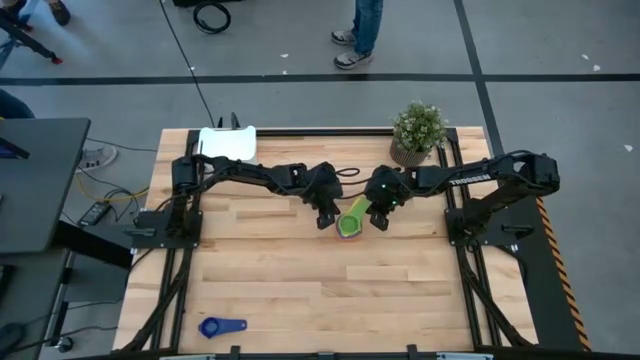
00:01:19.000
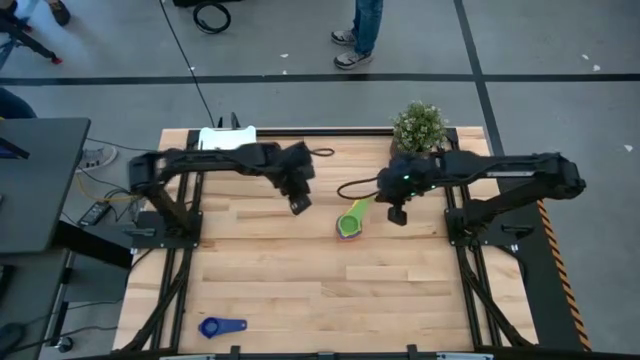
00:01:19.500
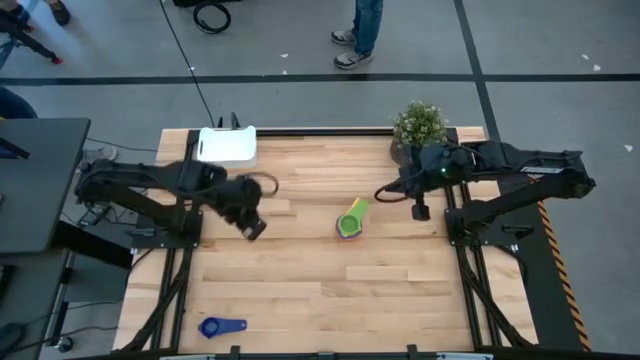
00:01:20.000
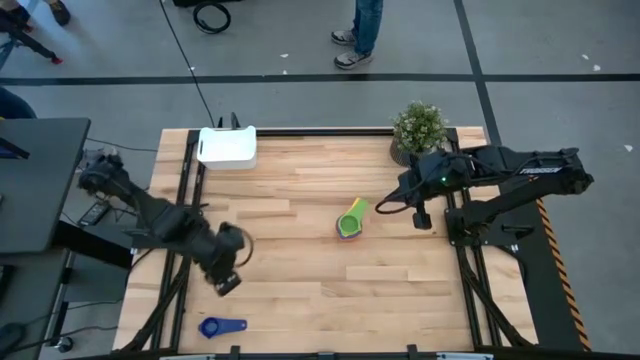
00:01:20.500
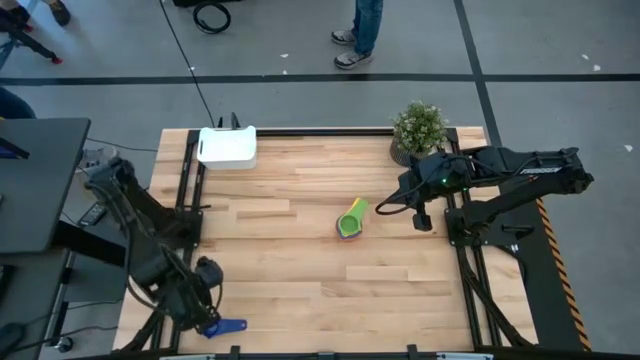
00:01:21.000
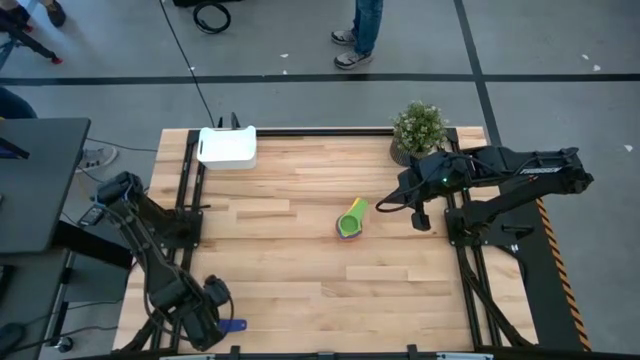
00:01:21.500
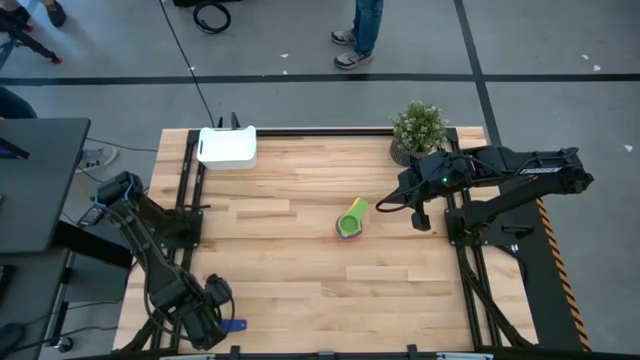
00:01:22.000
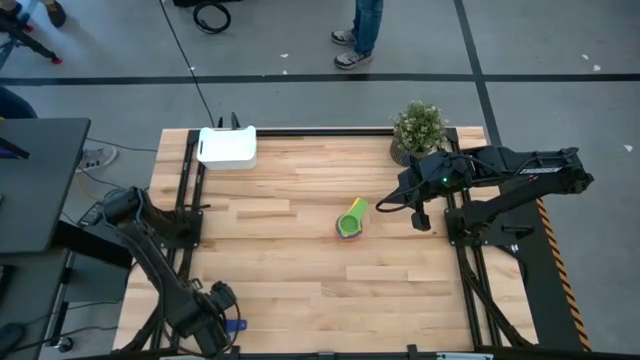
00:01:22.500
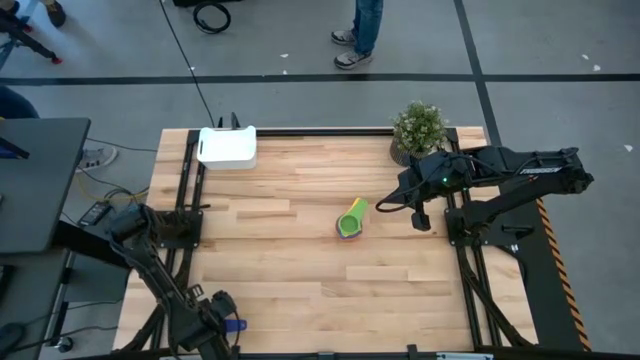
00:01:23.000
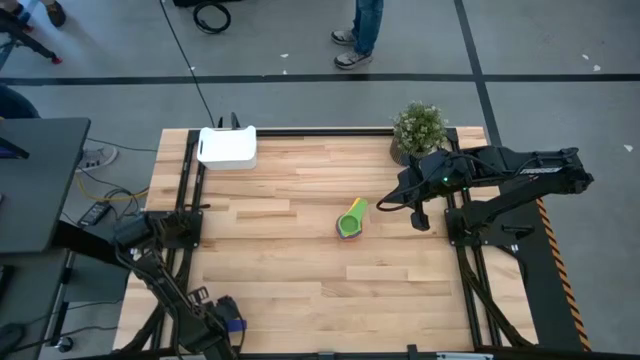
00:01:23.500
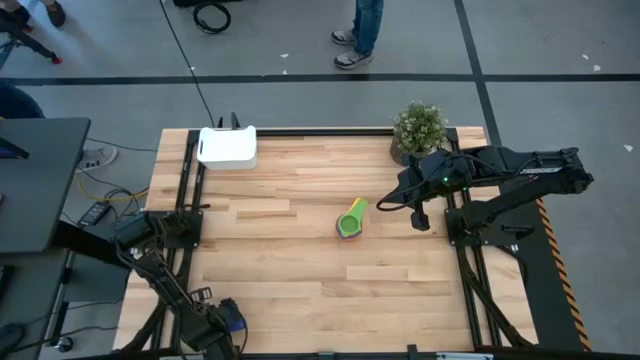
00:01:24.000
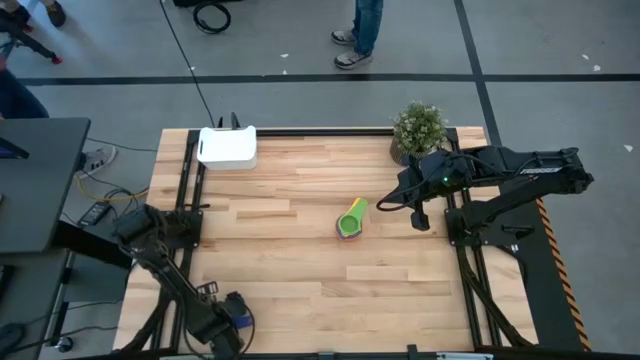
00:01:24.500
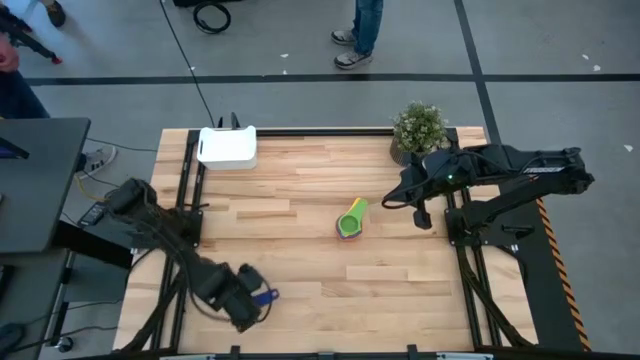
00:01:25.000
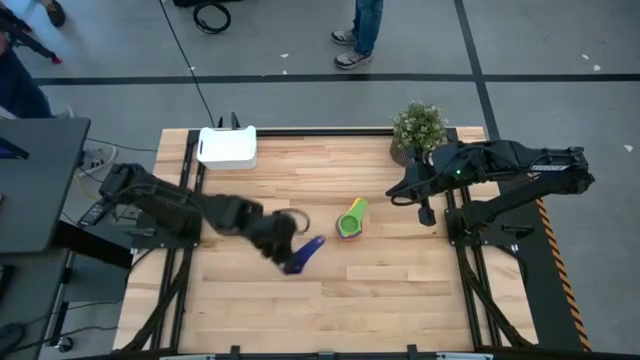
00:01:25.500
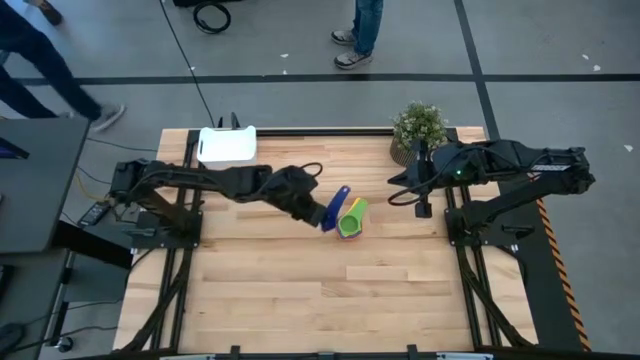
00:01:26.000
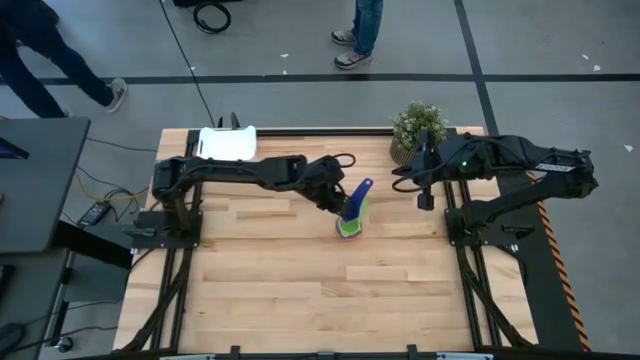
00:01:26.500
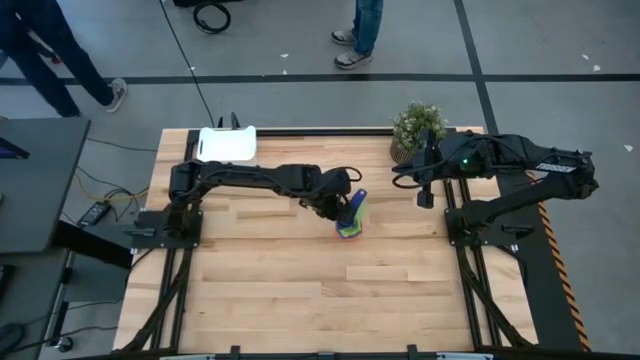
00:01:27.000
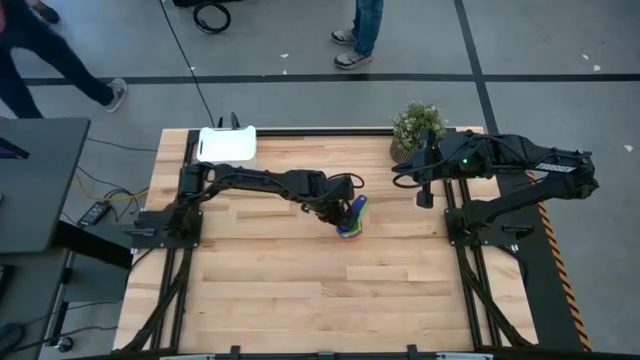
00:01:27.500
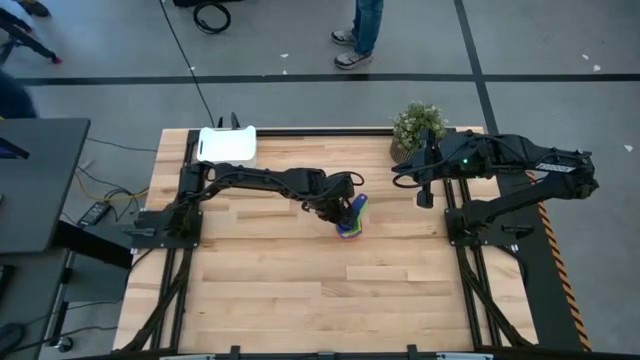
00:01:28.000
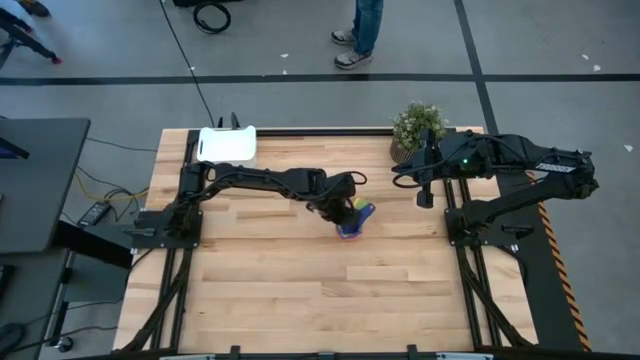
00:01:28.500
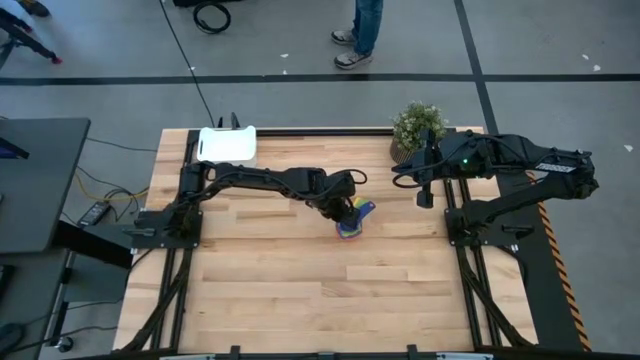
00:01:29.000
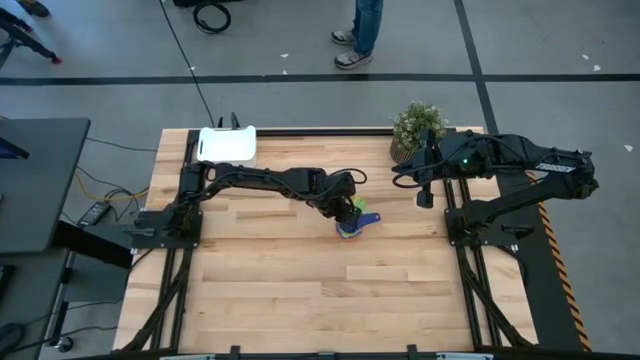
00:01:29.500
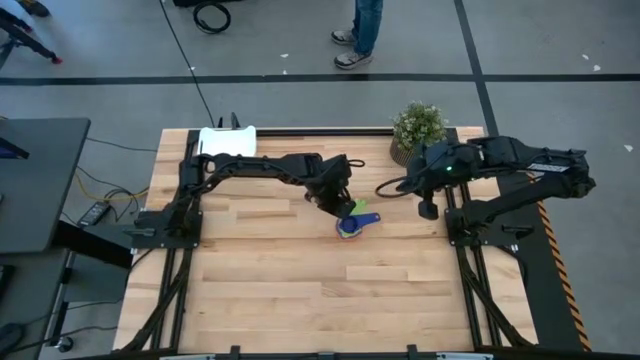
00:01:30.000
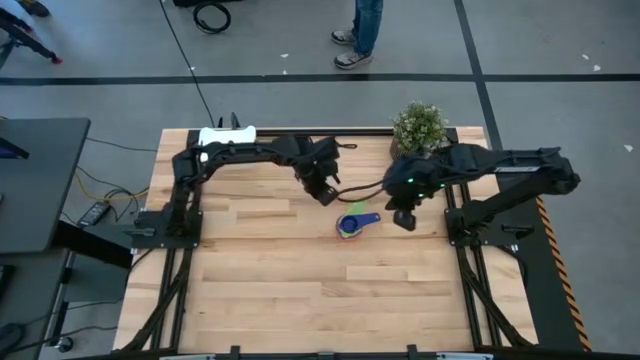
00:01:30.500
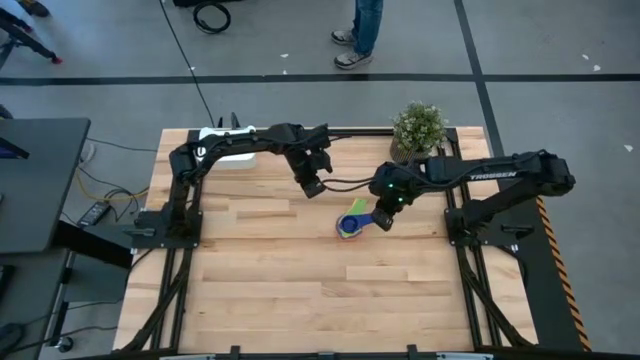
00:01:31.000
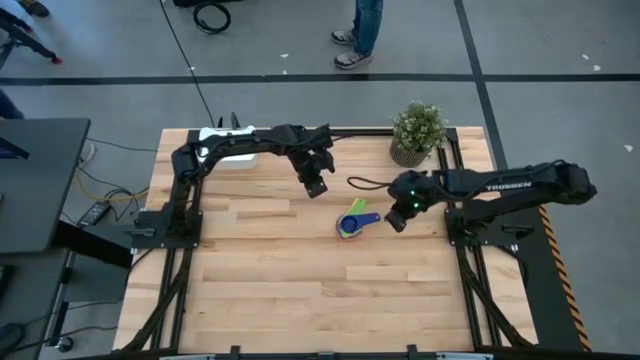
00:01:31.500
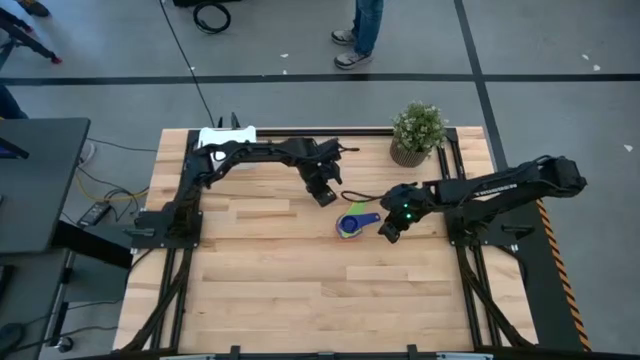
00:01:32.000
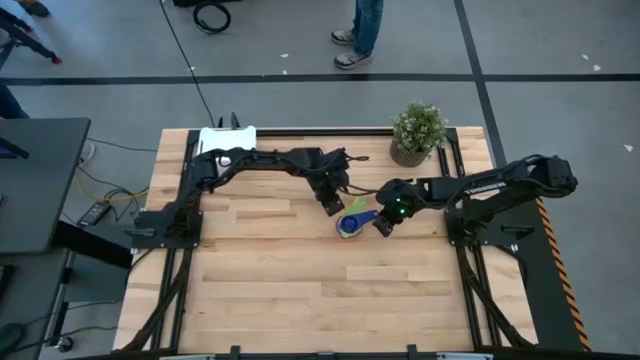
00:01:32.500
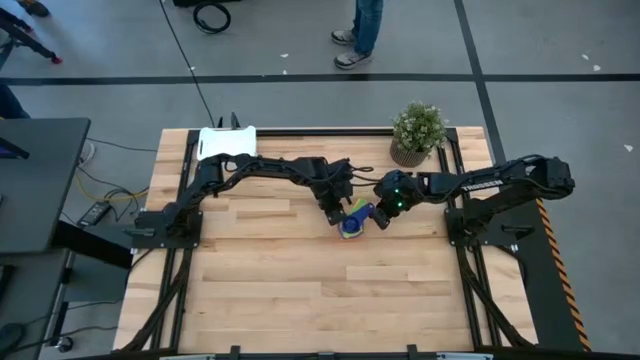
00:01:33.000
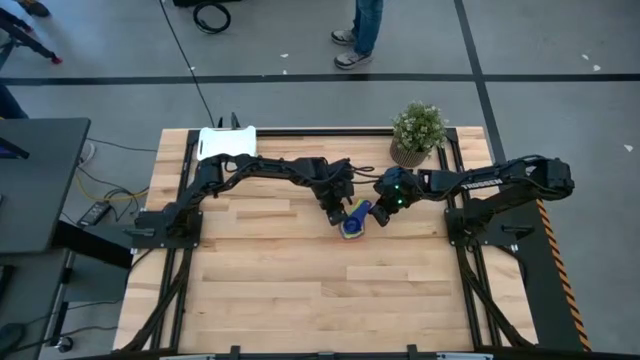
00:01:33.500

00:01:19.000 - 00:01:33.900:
Task: Nest measuring cups in basket
Stack the dark blue measuring cup on top of the green measuring cup

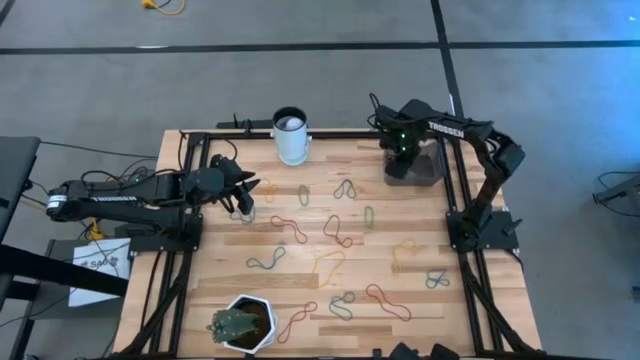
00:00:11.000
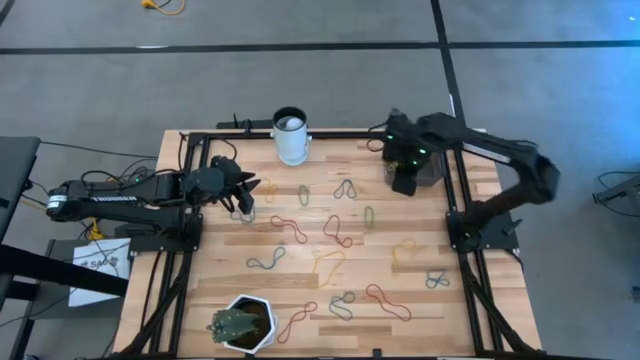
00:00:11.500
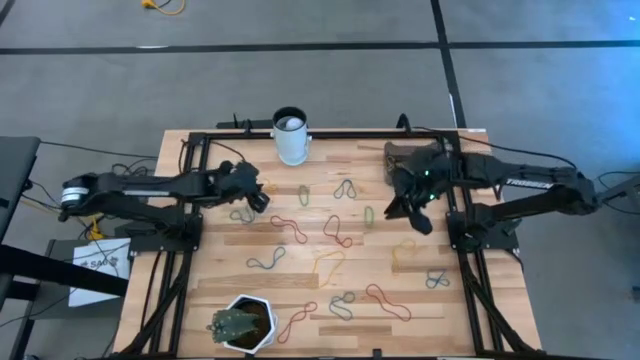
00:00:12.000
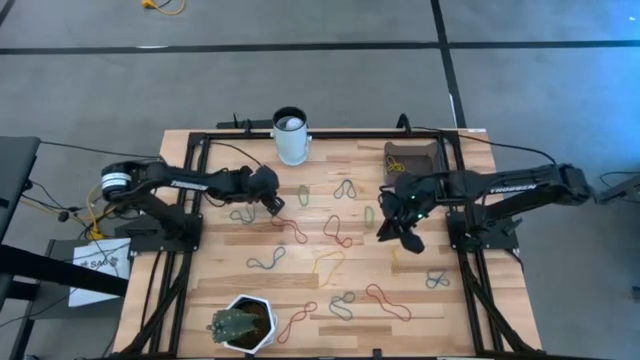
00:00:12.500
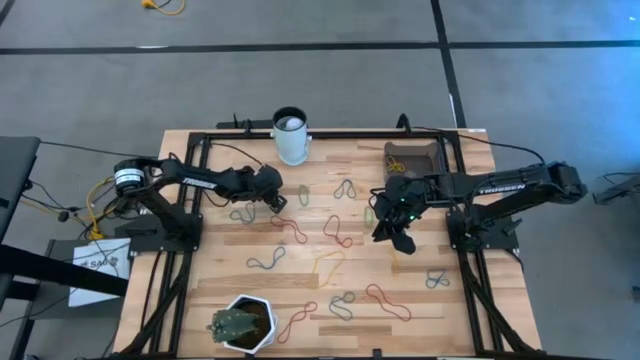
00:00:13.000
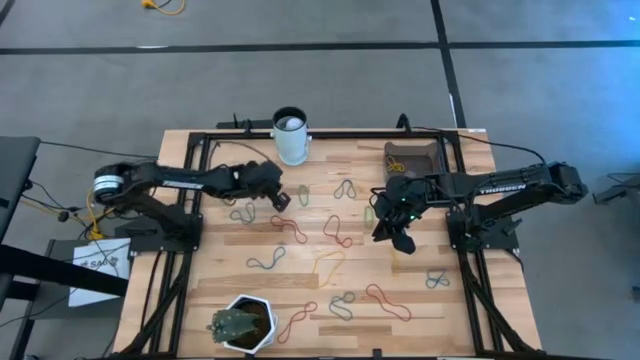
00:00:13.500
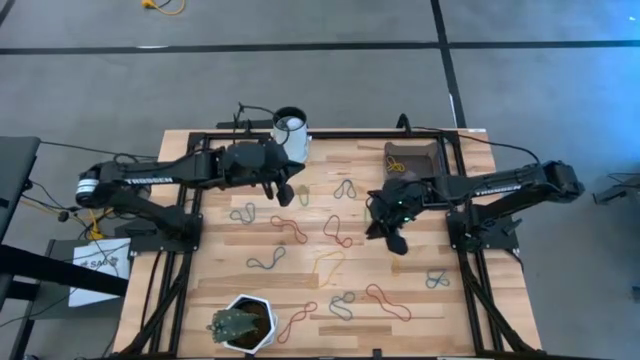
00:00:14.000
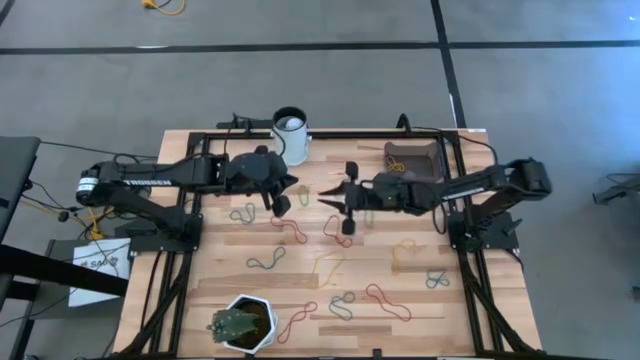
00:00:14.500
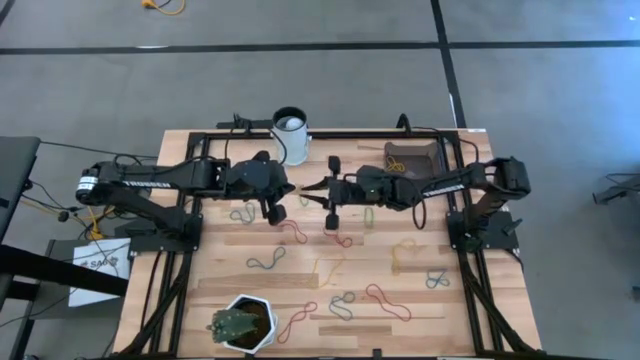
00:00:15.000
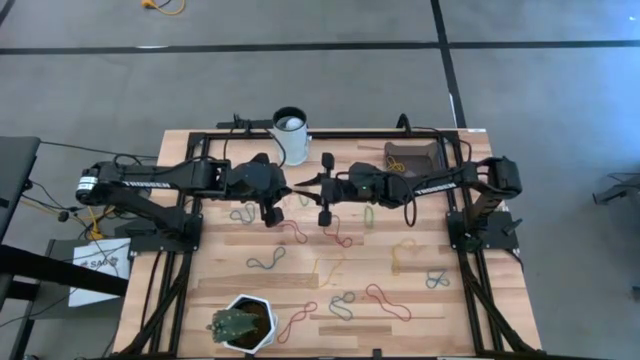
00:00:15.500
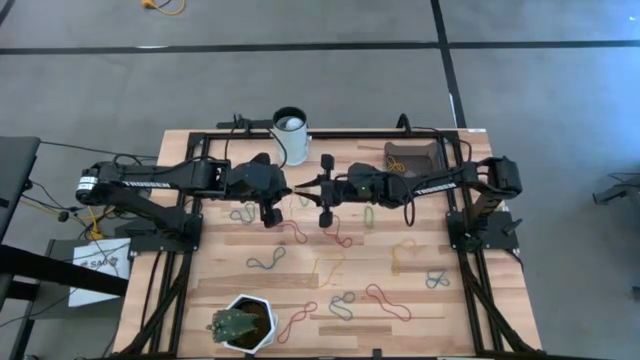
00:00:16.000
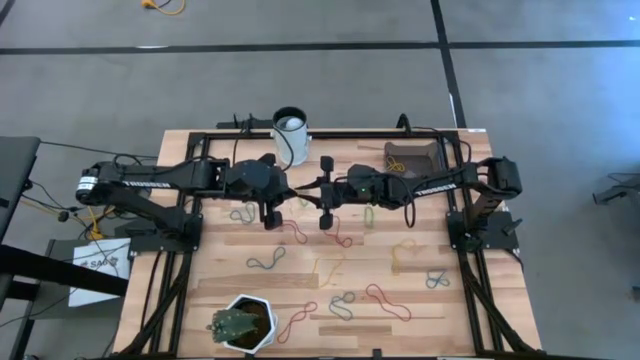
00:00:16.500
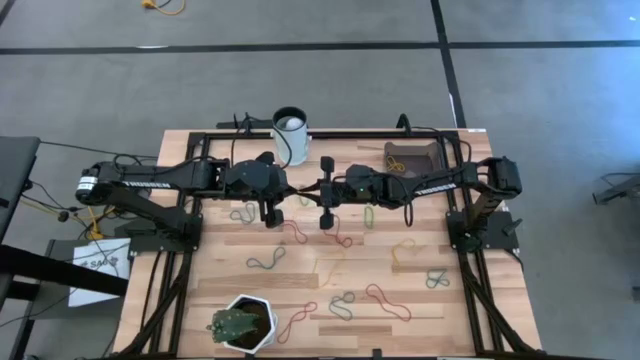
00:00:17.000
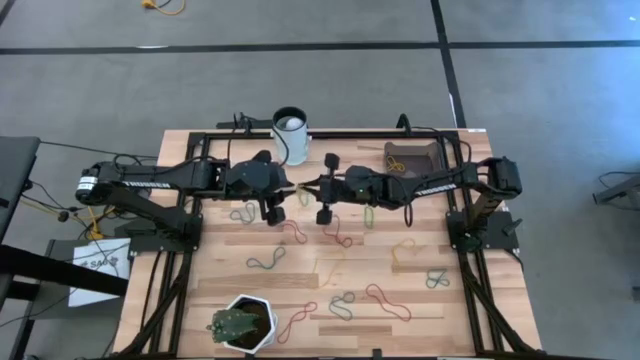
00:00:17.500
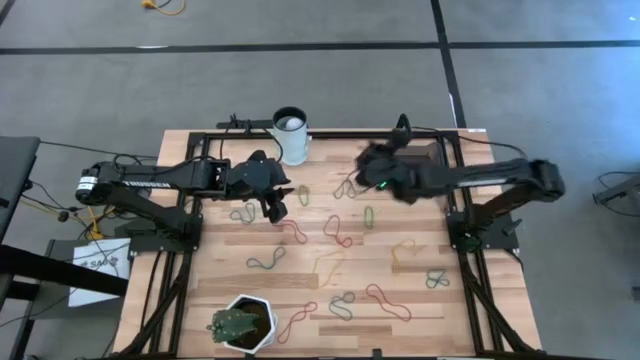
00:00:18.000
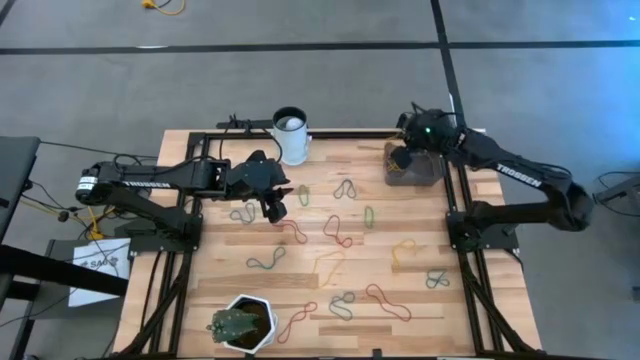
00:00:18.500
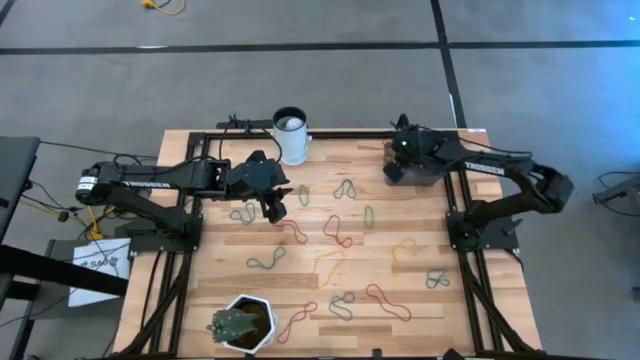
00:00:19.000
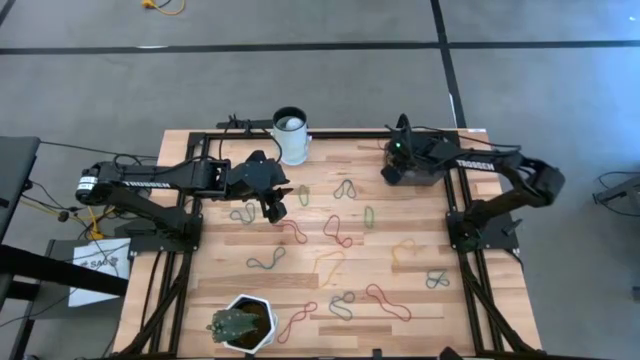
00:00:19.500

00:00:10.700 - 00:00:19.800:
Task: Pick and place items into bin
Put the top yellow rubber band into the bin
